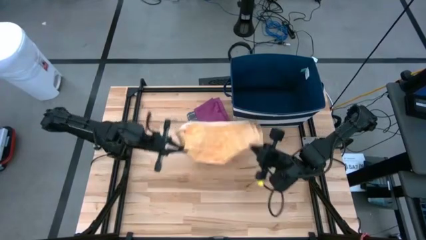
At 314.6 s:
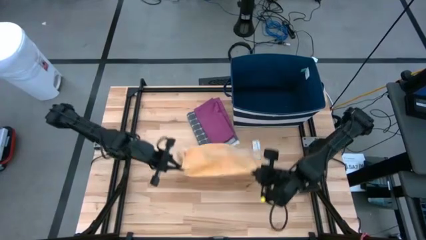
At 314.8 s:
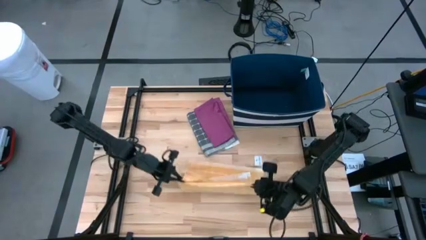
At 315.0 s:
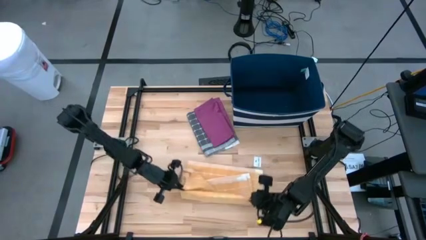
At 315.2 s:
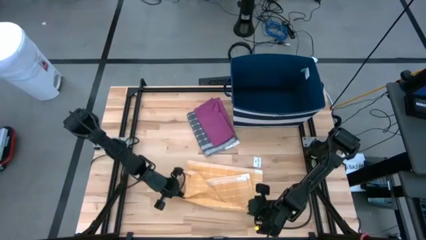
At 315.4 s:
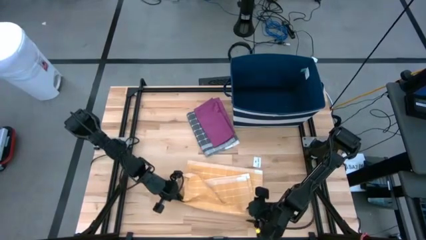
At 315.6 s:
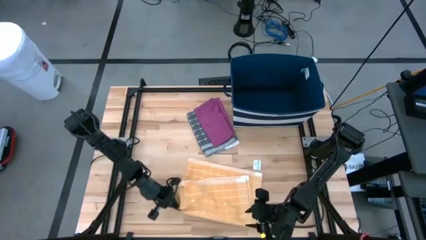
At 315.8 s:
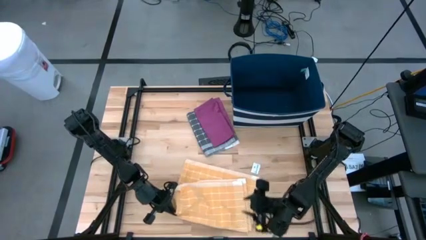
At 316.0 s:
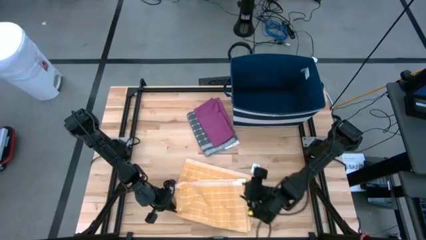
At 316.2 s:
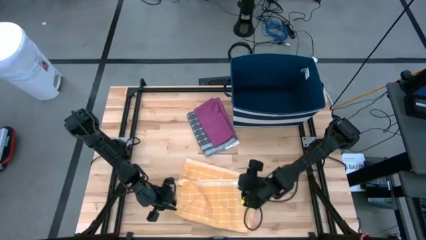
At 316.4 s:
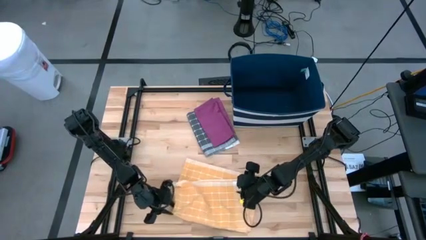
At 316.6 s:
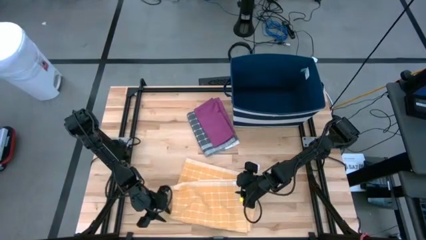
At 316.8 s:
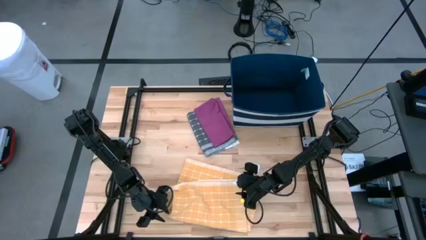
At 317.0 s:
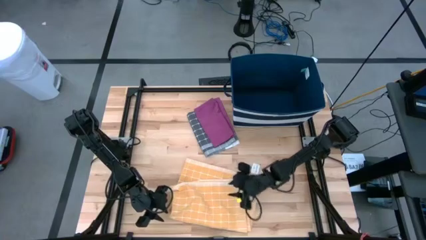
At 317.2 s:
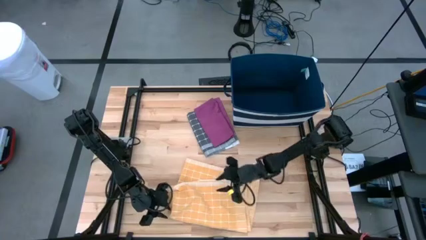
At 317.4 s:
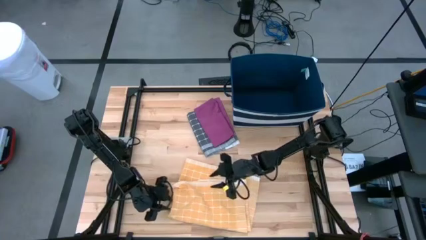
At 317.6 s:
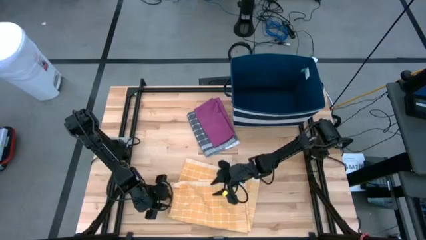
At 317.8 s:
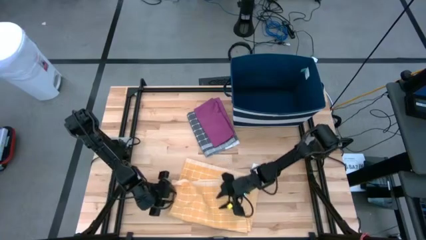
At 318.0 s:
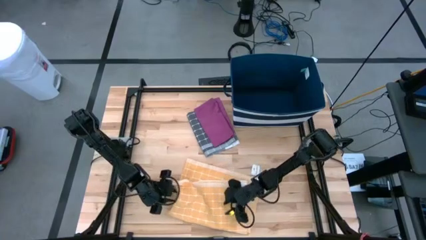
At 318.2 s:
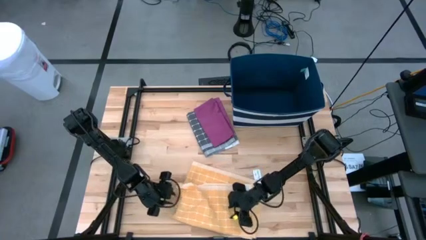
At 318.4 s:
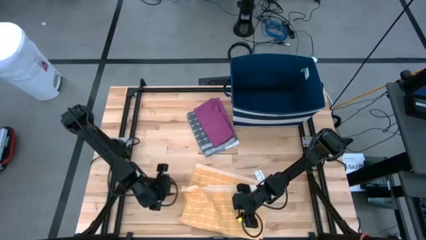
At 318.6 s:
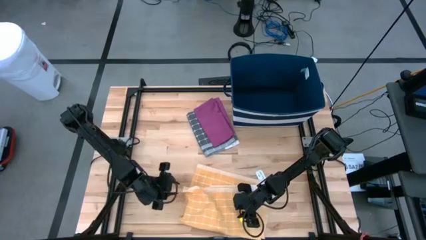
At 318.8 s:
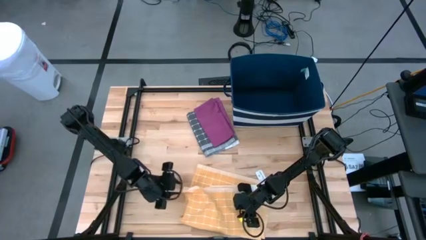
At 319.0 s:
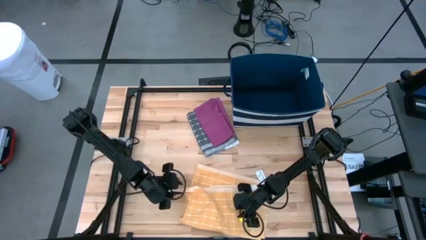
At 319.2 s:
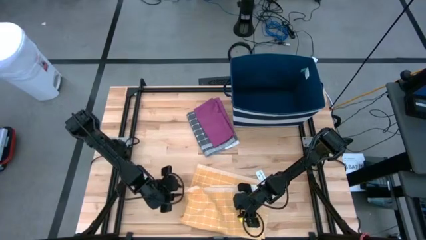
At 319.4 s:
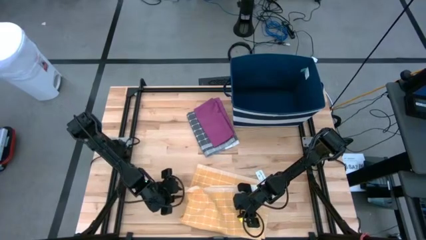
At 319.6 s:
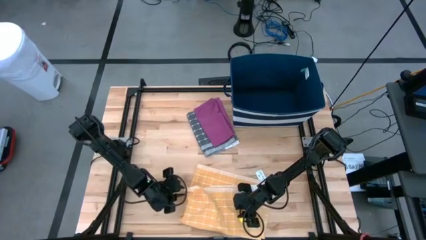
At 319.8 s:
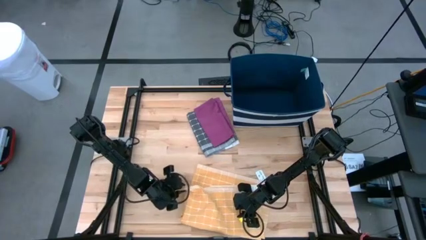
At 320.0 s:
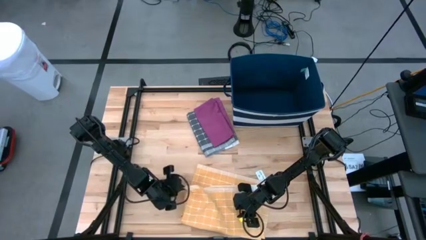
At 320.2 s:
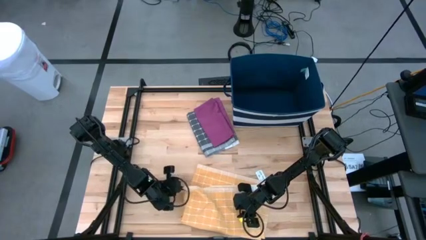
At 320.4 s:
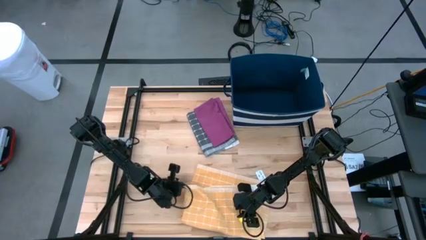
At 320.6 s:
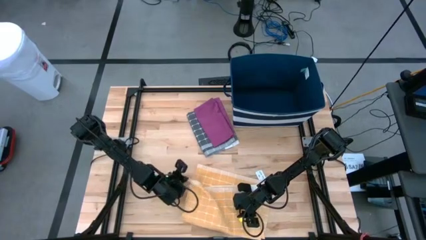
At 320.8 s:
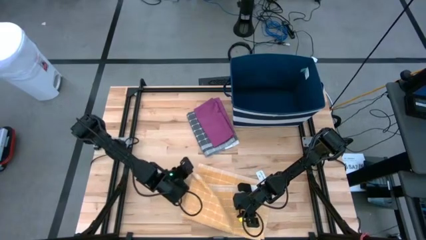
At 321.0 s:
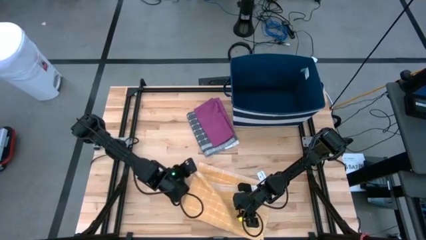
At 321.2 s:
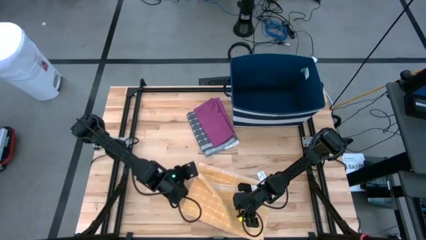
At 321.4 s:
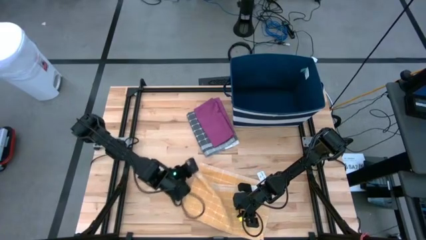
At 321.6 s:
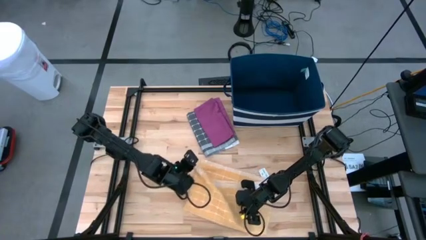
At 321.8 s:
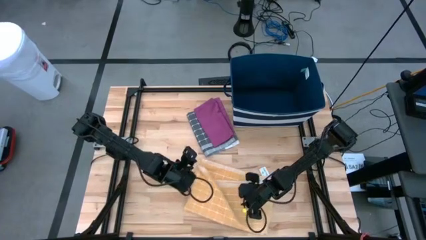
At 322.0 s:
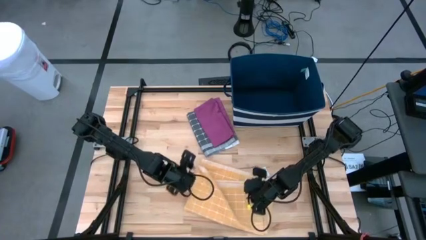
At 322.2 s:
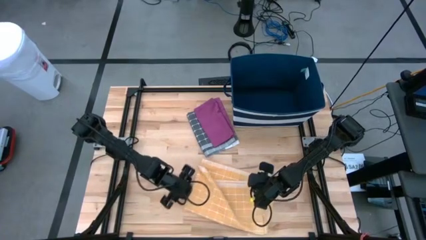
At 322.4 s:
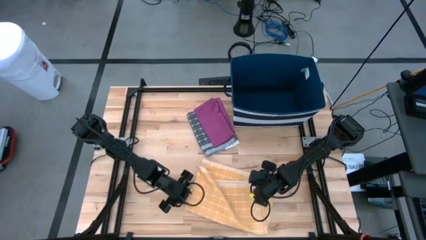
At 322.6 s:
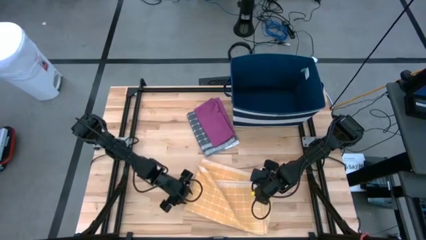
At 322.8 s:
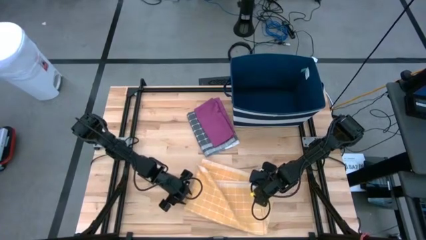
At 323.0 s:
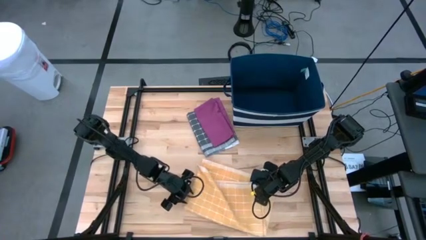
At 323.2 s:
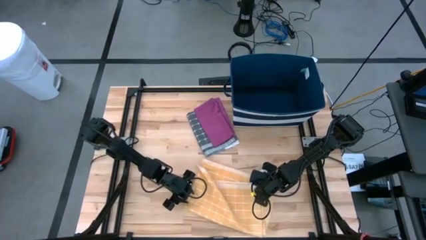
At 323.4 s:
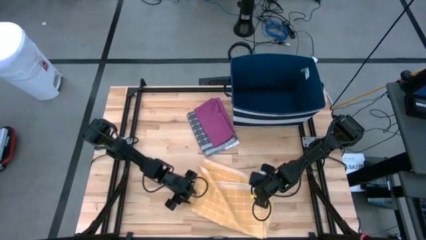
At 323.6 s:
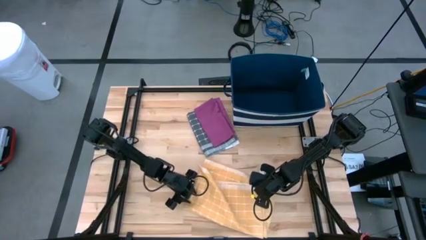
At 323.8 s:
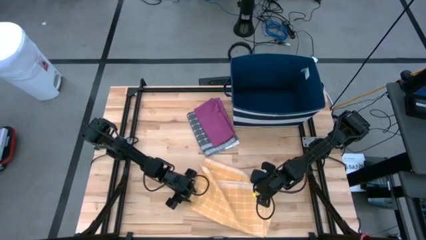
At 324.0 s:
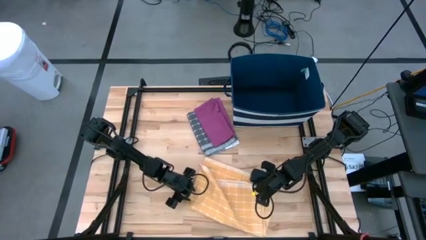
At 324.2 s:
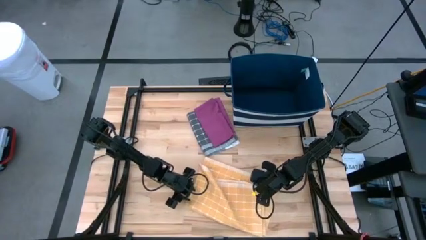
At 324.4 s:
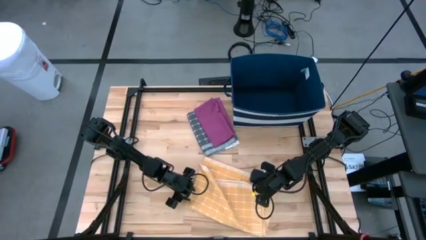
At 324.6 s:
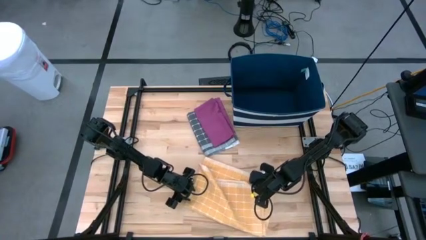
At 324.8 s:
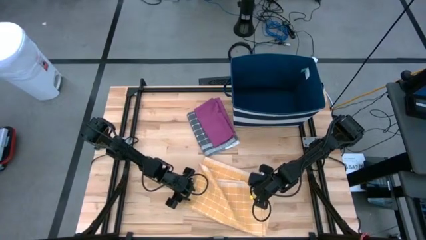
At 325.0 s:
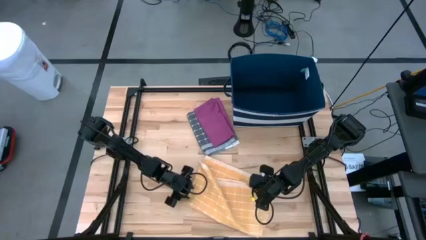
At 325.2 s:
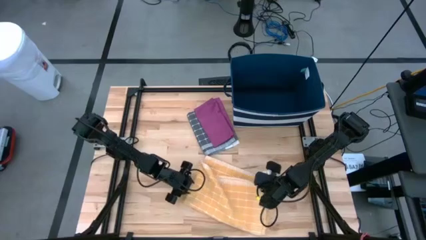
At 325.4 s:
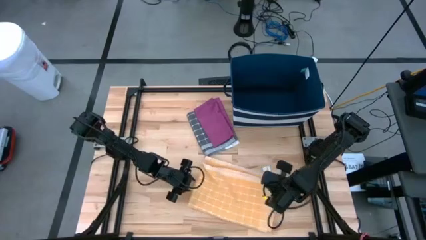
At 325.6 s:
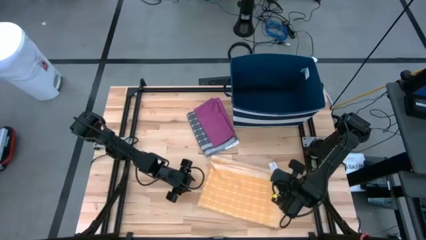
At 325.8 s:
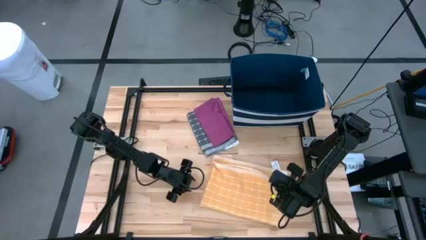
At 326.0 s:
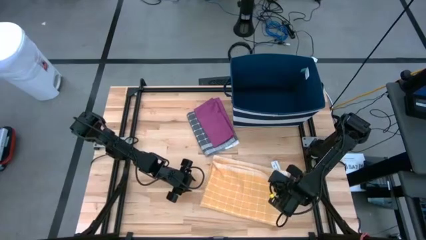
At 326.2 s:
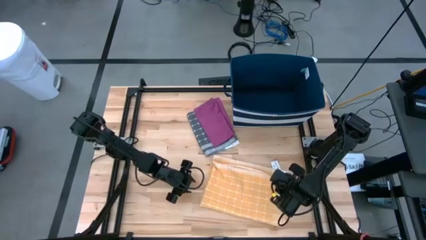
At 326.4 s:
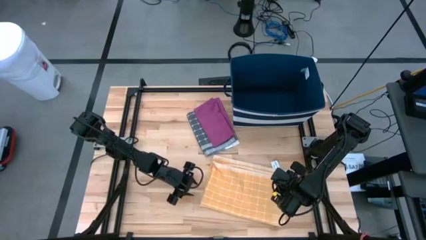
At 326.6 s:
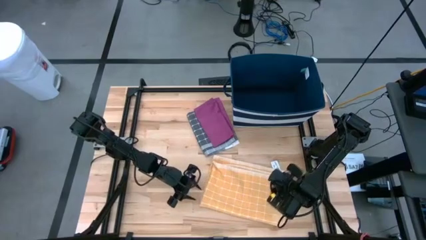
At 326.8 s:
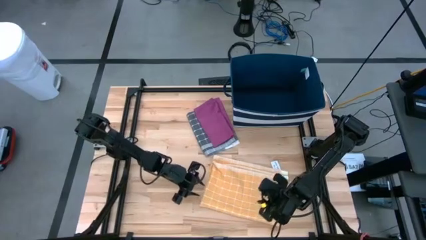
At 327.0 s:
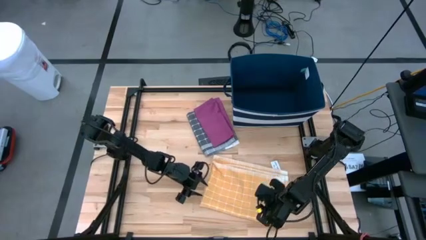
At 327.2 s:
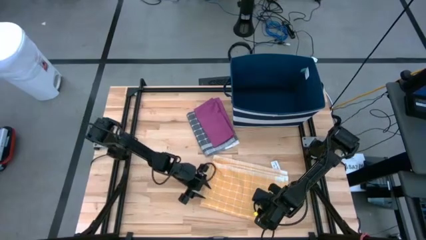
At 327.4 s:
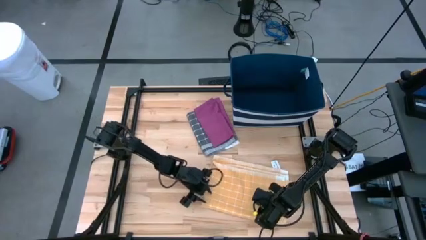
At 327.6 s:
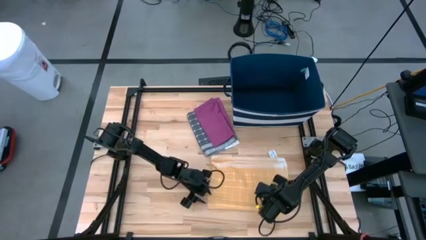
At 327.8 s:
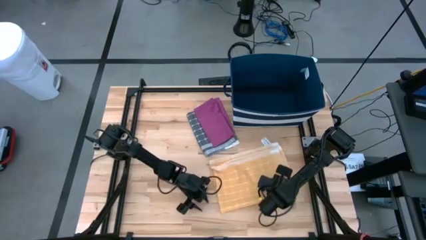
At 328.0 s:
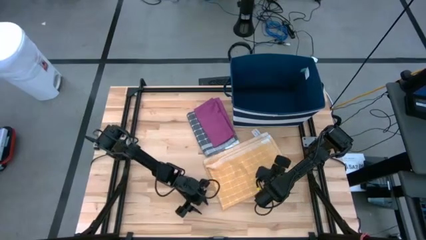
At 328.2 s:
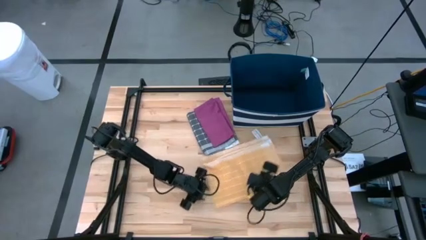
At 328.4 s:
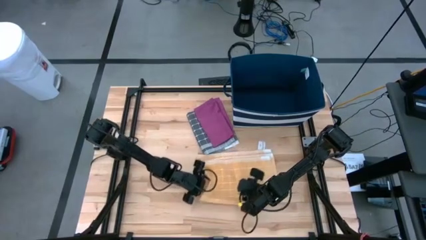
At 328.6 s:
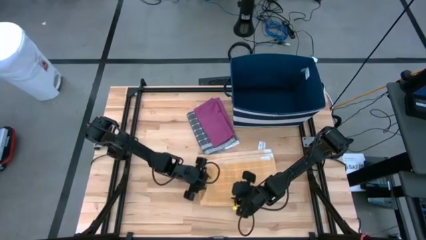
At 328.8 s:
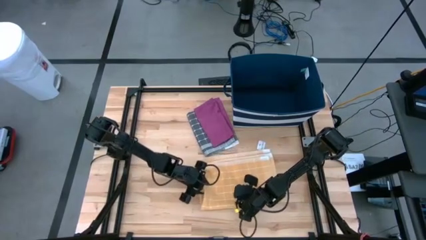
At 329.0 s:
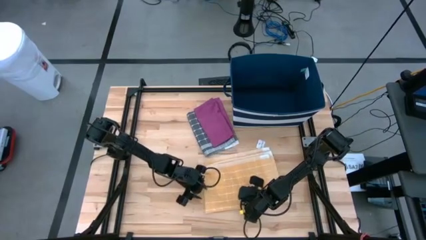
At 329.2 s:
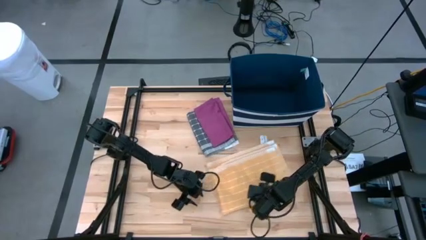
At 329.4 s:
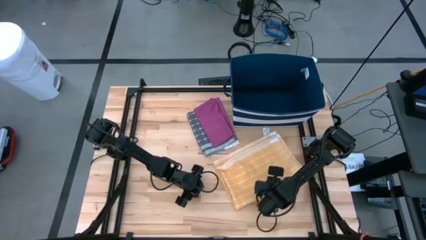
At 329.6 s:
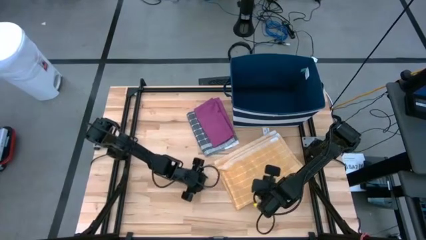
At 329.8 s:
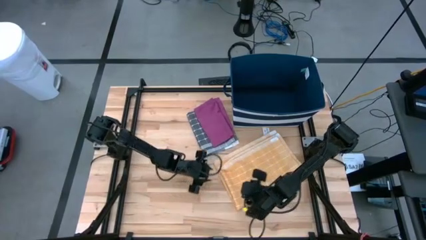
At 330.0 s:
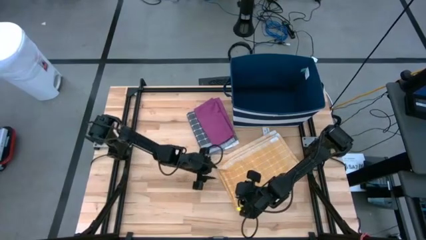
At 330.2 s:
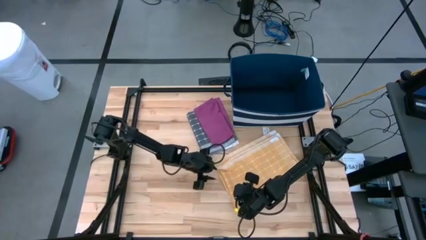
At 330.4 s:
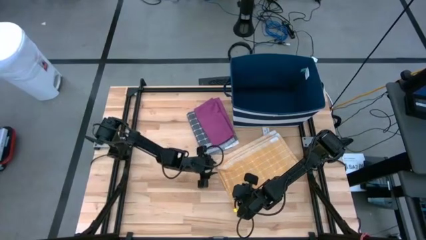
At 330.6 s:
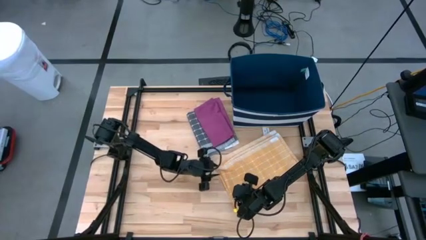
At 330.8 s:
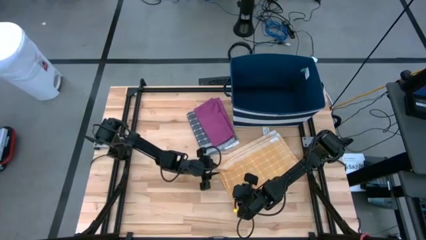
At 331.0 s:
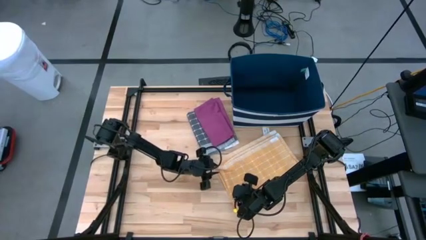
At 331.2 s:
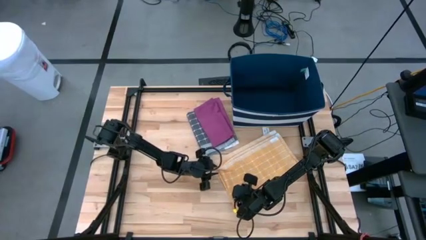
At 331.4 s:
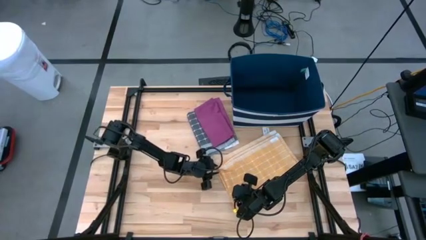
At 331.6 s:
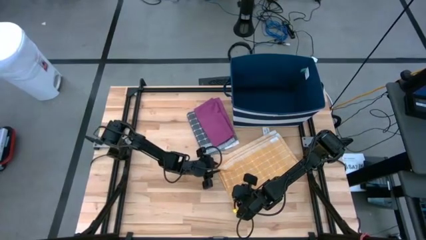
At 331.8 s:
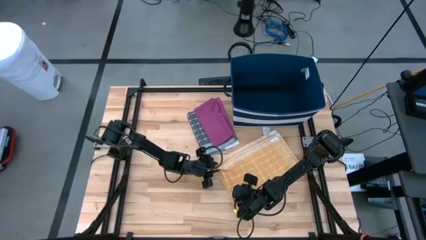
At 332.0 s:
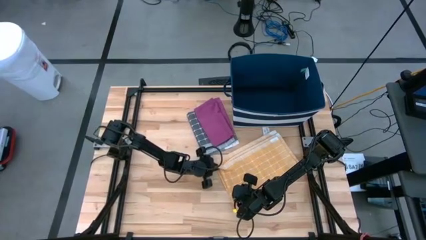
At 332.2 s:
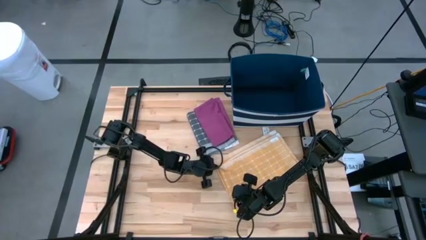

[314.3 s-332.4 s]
Task: Fold towel
Fold the orange checkered towel
